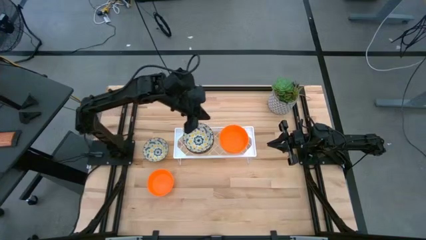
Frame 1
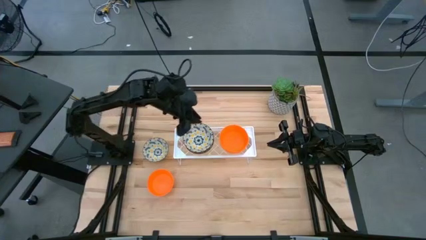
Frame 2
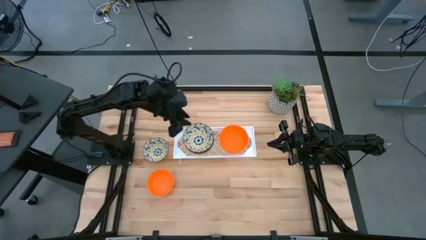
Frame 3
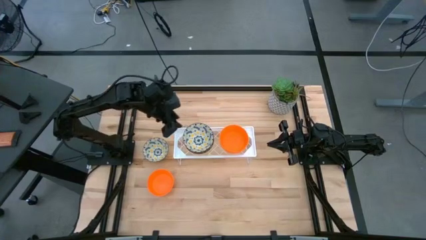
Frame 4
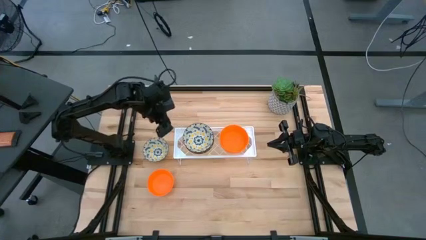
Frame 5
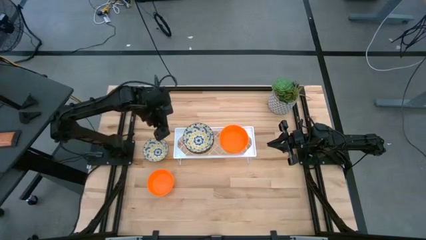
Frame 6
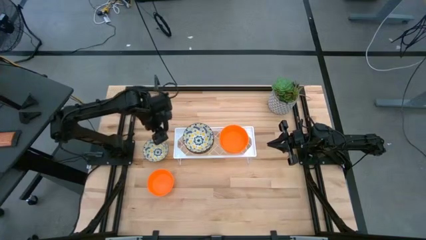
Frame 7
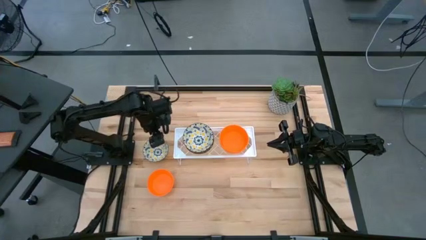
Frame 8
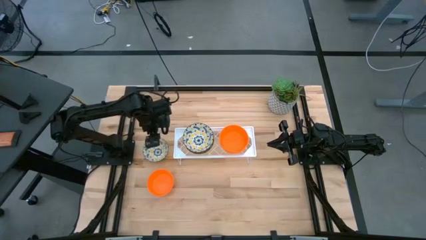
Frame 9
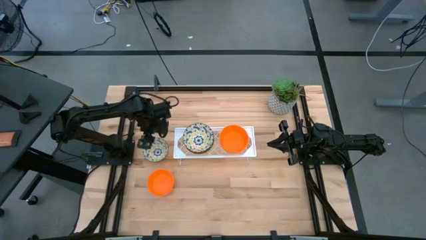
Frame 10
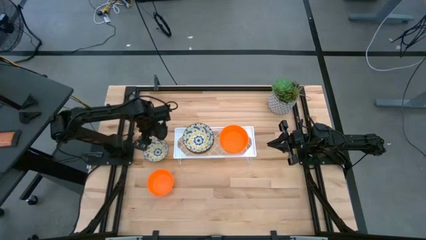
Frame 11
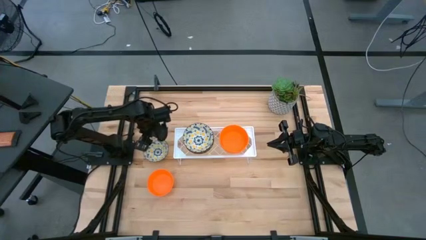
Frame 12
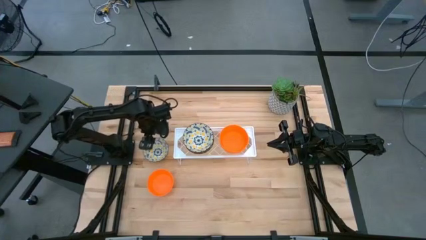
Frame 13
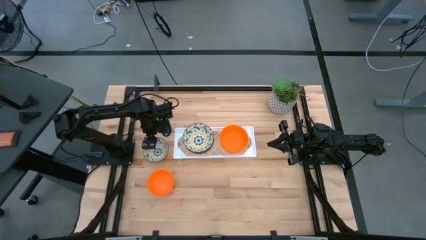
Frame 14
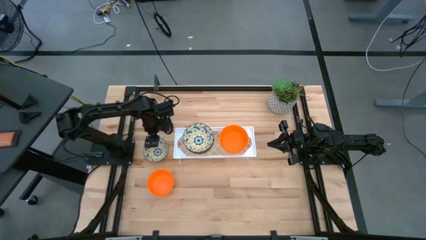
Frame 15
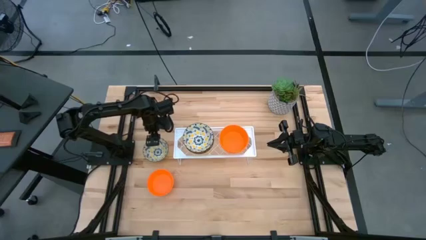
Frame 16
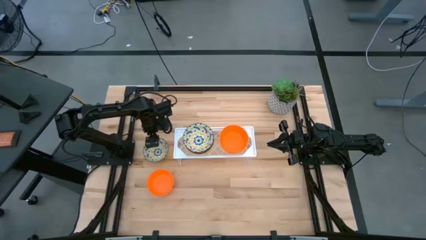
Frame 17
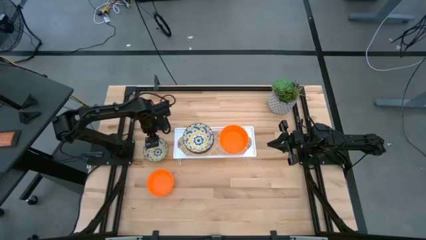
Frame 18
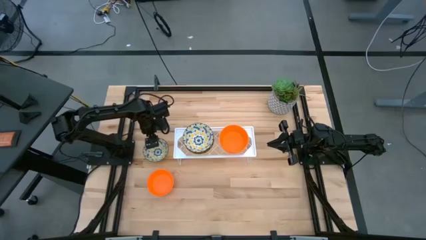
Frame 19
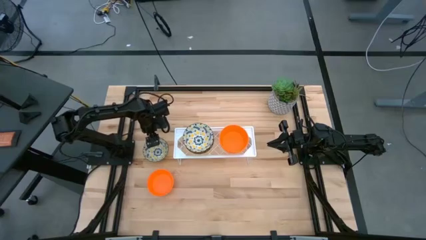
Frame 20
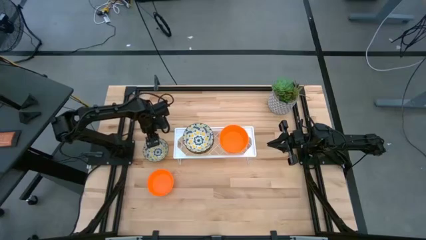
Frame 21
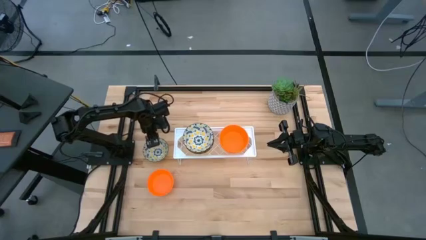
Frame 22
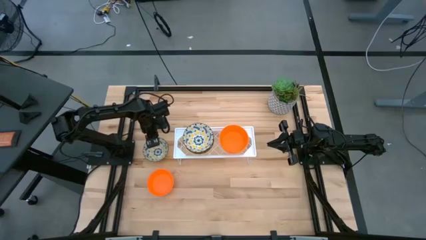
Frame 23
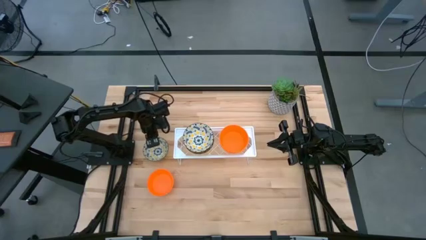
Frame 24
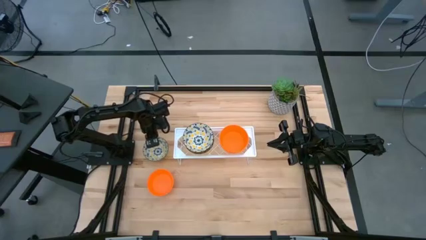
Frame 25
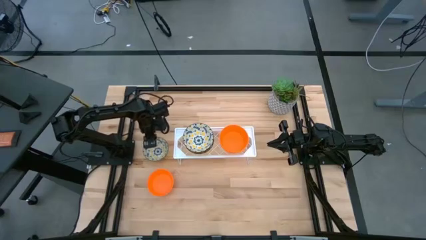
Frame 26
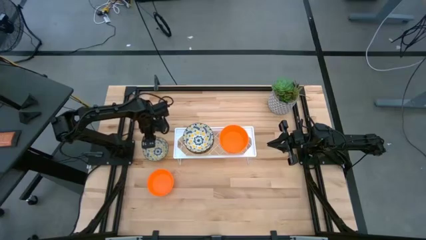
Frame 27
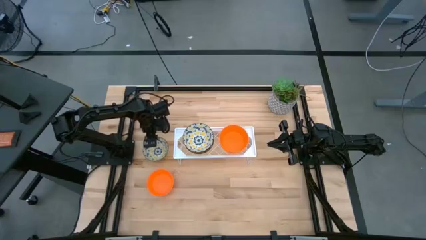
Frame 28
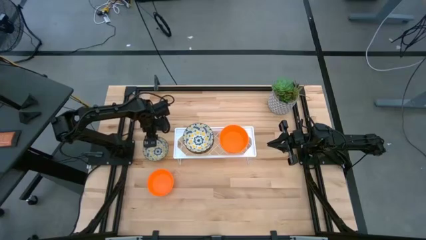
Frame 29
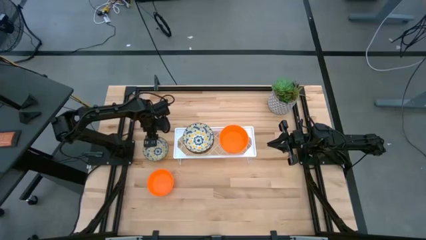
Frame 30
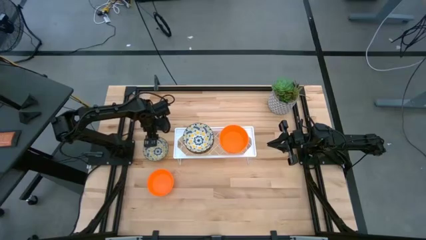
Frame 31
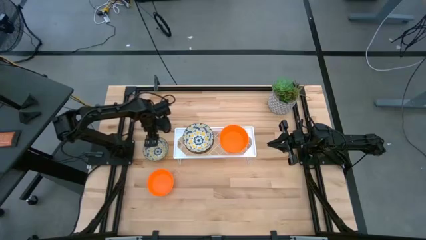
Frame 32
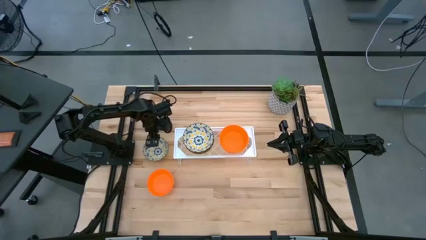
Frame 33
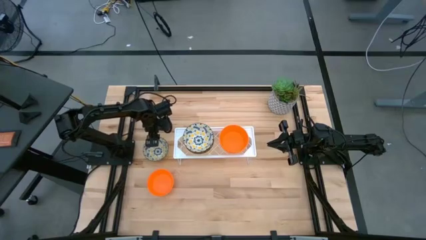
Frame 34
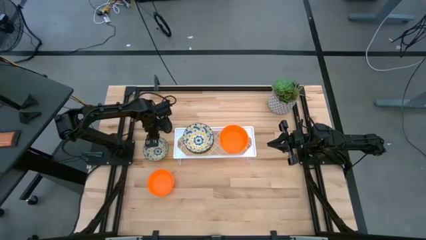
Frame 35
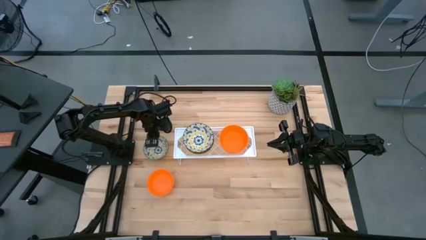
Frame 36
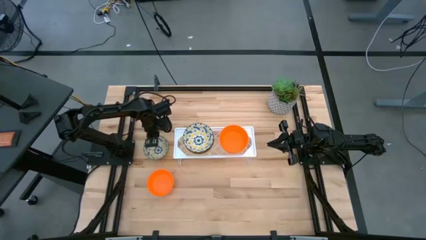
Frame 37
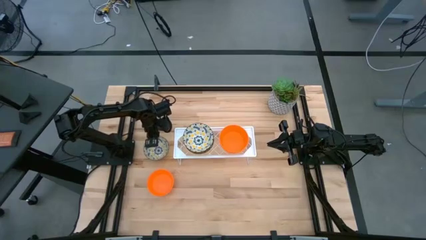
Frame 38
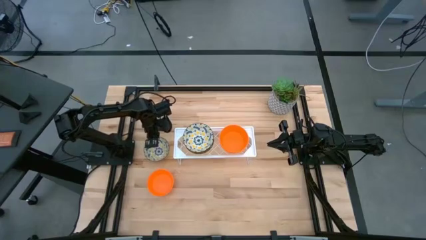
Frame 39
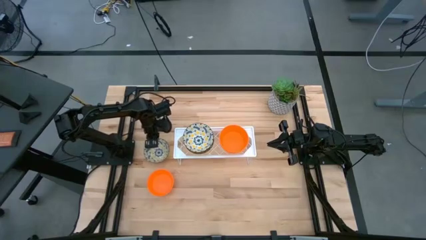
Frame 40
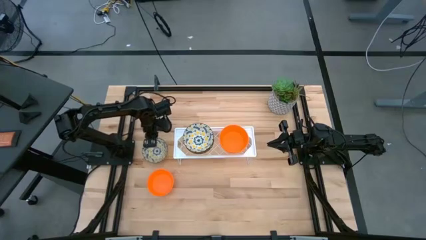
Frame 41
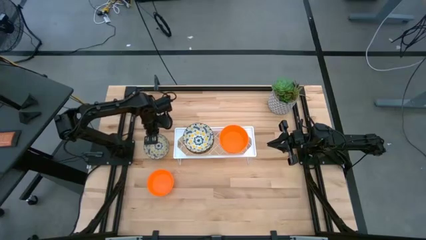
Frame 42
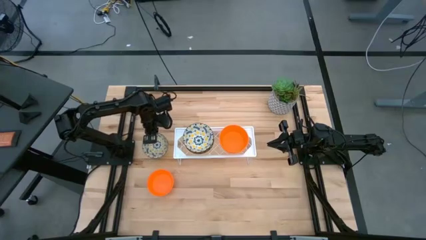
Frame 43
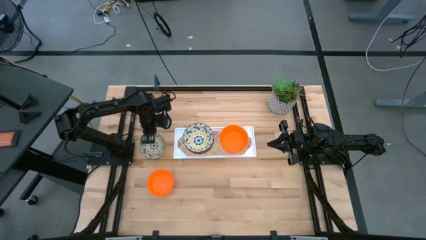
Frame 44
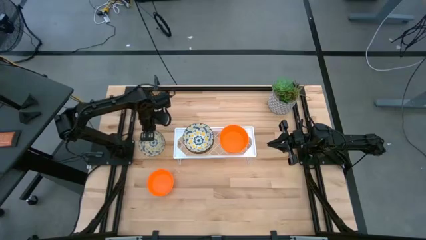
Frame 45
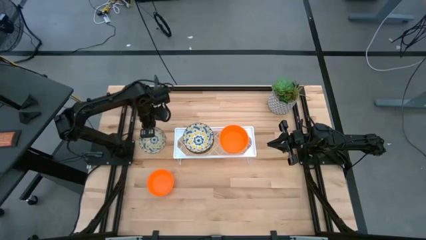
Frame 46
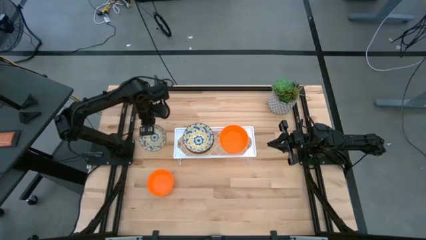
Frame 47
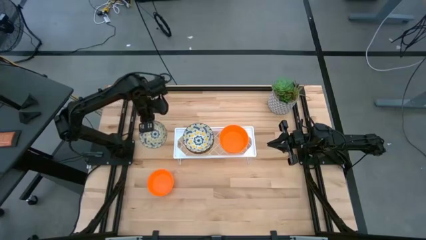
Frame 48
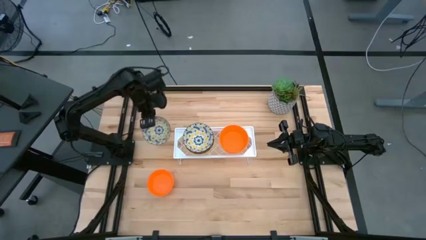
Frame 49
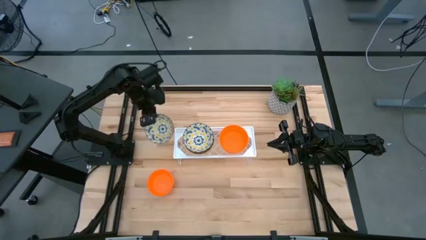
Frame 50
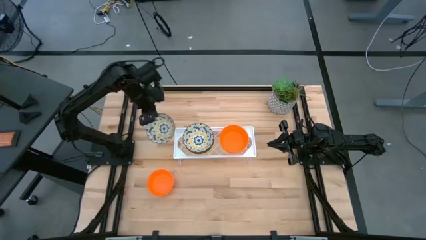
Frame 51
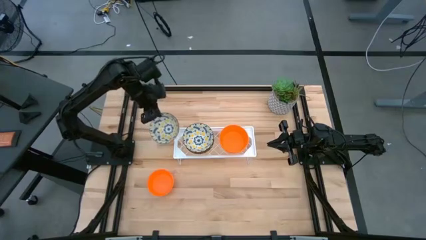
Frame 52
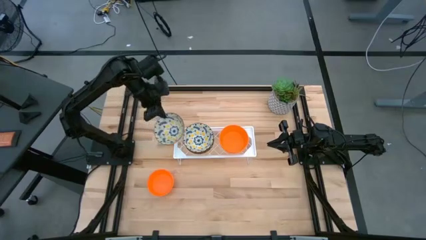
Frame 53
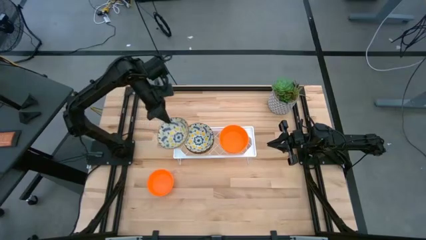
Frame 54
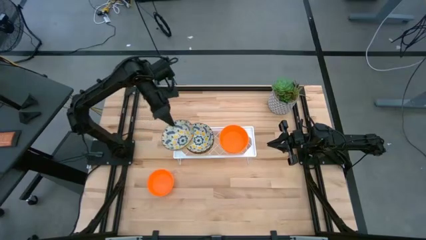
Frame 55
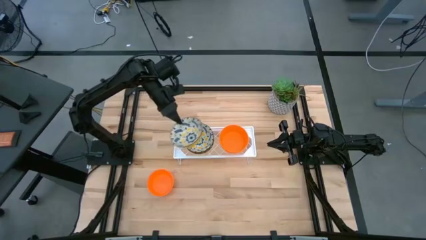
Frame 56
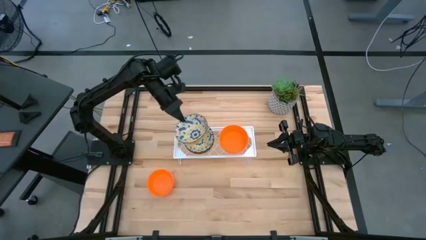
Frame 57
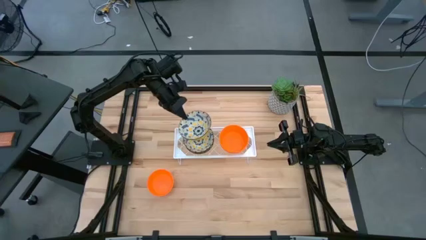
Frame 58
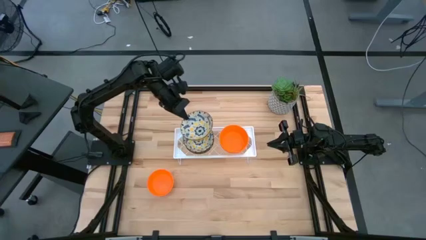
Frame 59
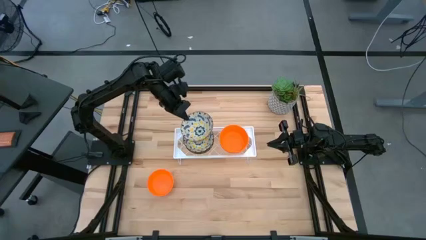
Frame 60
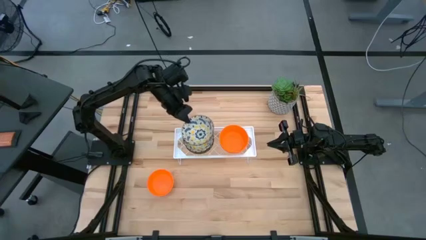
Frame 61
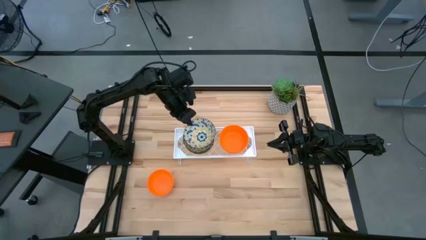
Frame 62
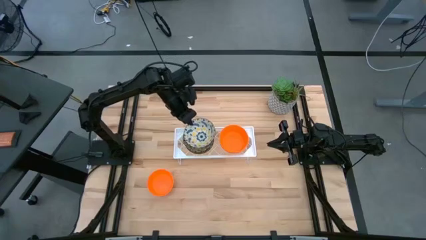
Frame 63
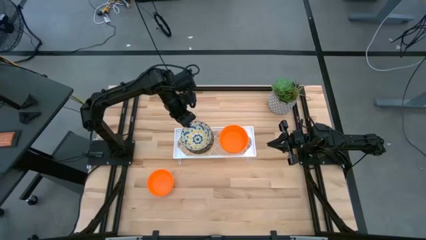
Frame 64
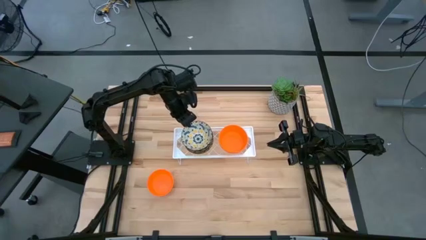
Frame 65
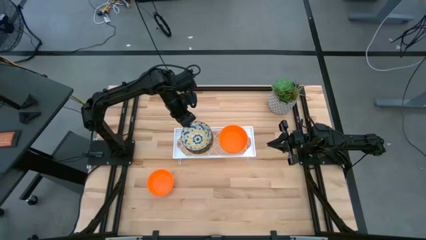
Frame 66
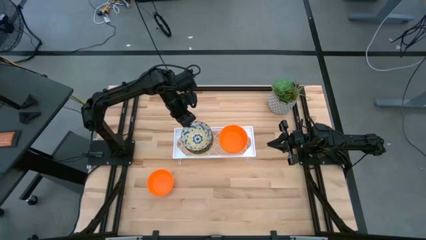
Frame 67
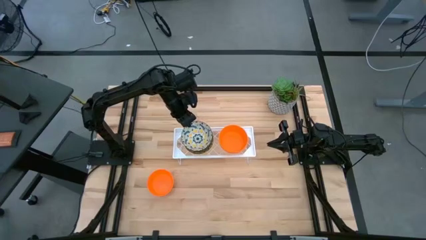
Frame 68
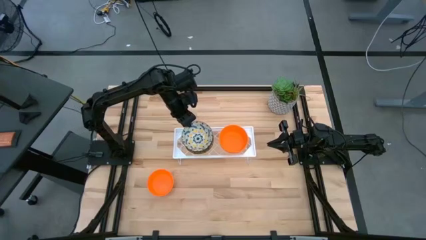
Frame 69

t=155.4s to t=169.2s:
Task: Pick & Place Mini bowls
Stack the white patterned bowl on the white patterned bowl on the shelf
